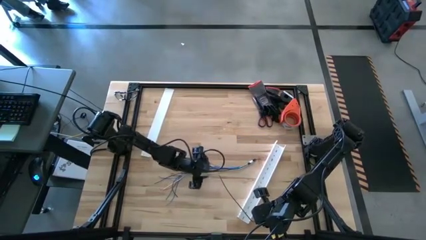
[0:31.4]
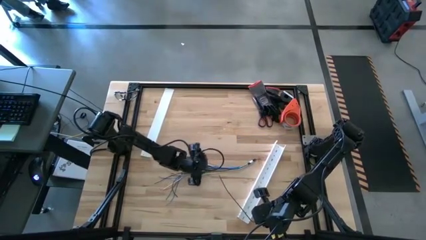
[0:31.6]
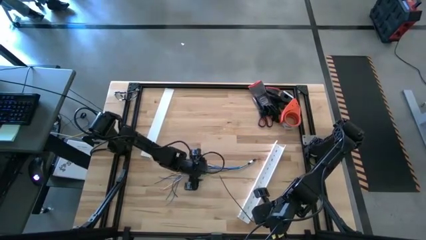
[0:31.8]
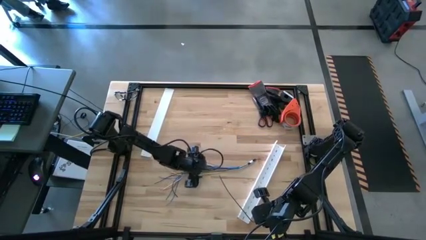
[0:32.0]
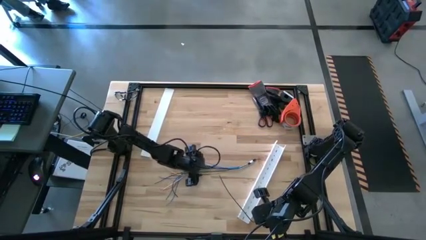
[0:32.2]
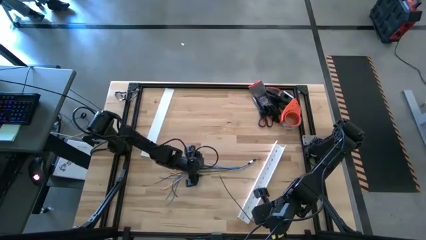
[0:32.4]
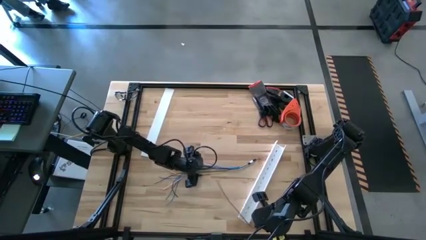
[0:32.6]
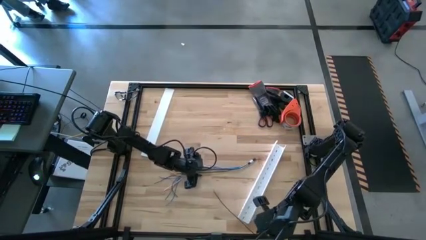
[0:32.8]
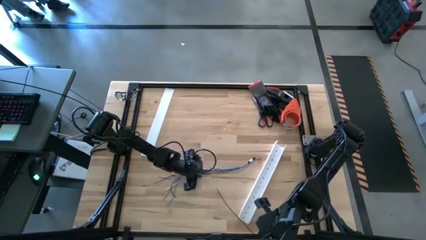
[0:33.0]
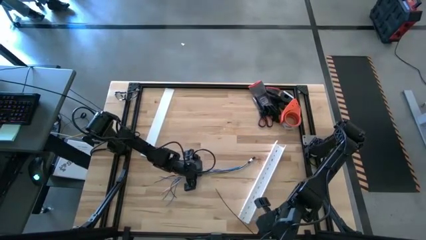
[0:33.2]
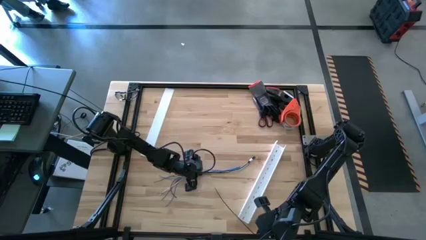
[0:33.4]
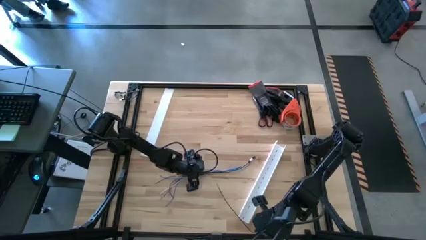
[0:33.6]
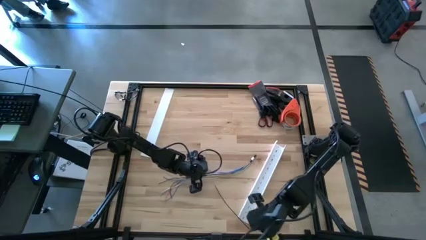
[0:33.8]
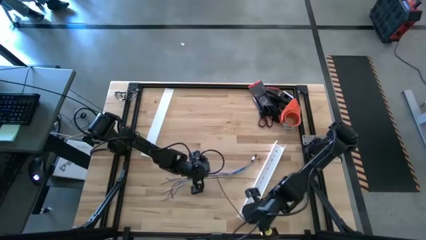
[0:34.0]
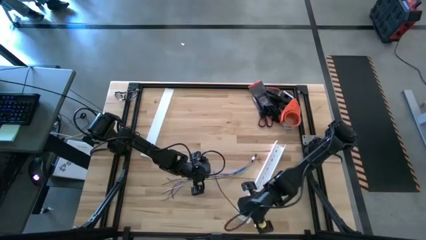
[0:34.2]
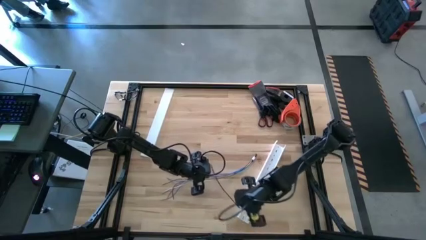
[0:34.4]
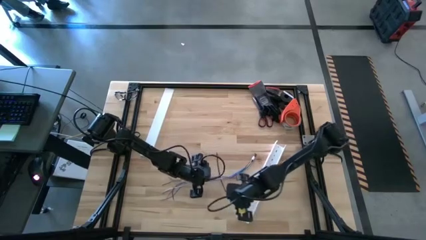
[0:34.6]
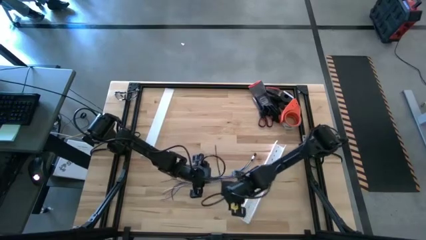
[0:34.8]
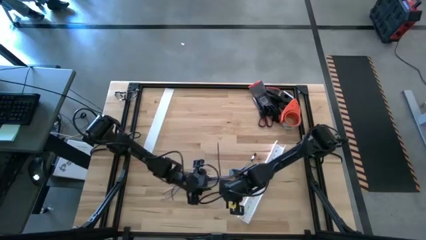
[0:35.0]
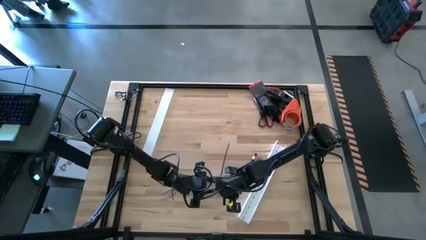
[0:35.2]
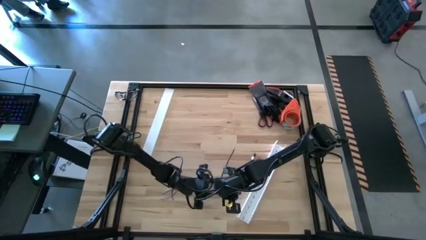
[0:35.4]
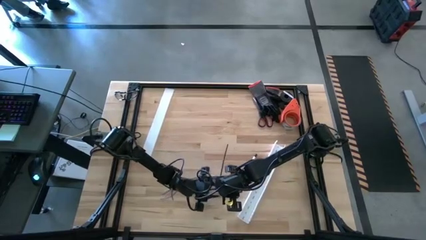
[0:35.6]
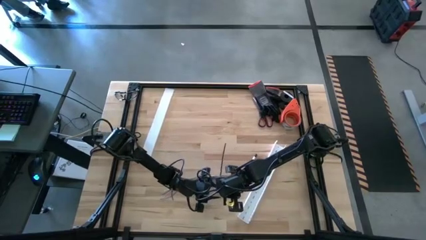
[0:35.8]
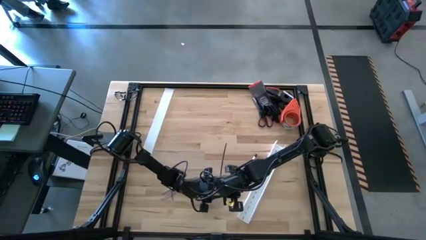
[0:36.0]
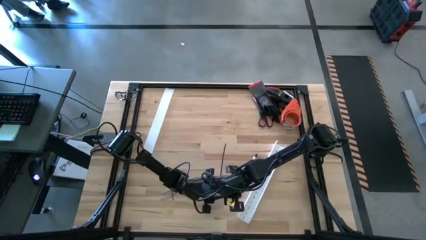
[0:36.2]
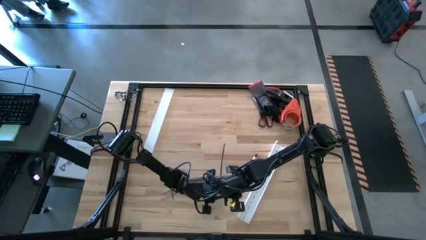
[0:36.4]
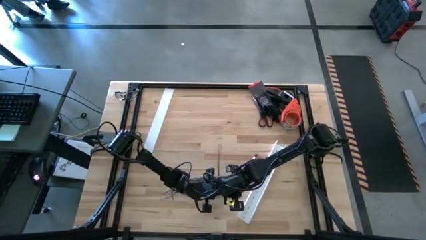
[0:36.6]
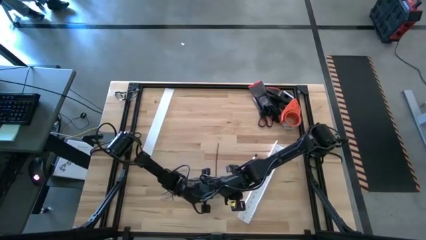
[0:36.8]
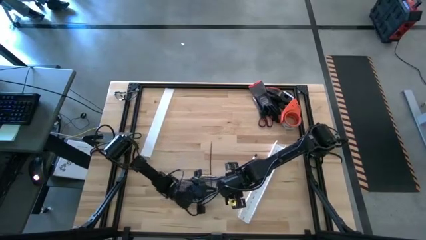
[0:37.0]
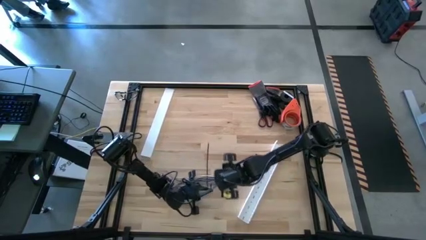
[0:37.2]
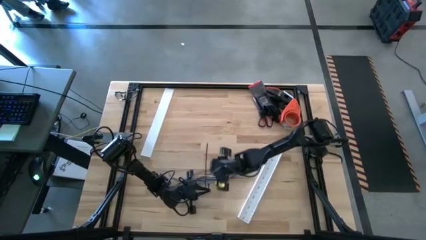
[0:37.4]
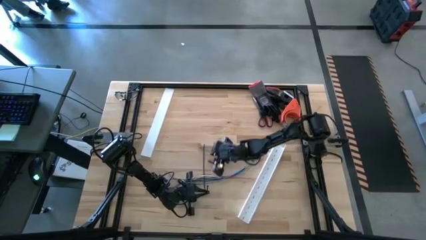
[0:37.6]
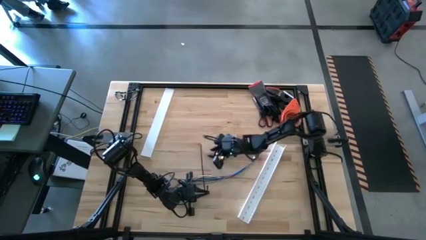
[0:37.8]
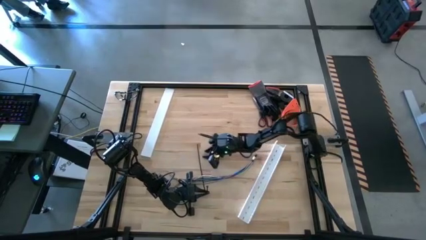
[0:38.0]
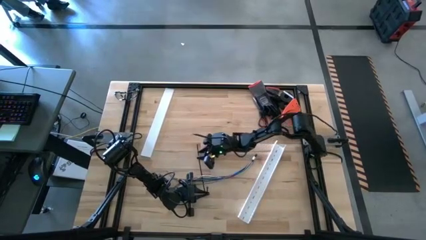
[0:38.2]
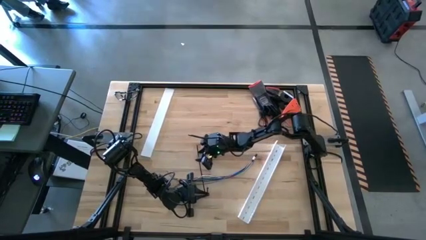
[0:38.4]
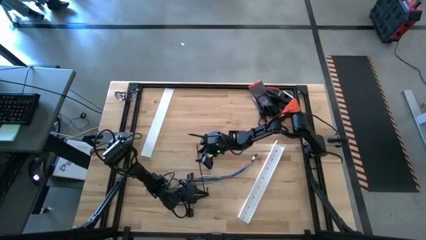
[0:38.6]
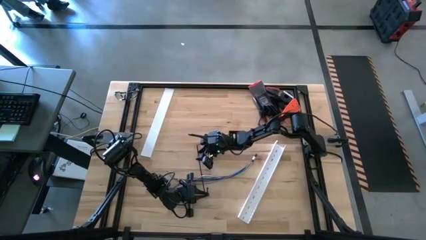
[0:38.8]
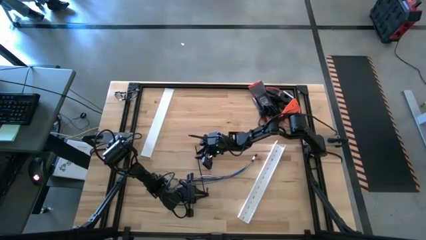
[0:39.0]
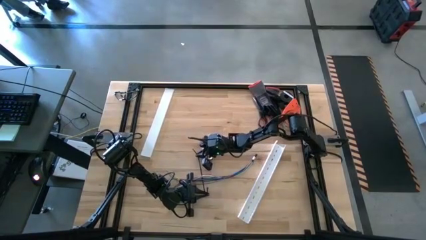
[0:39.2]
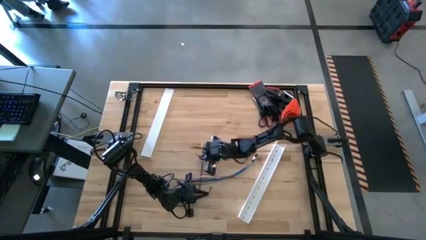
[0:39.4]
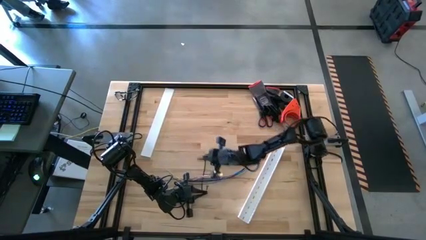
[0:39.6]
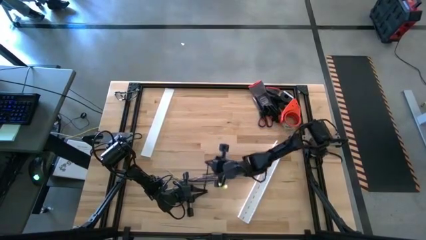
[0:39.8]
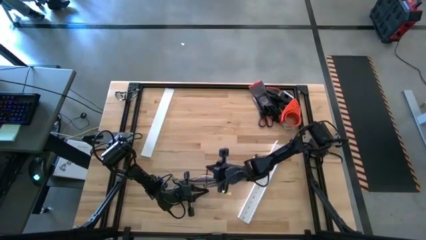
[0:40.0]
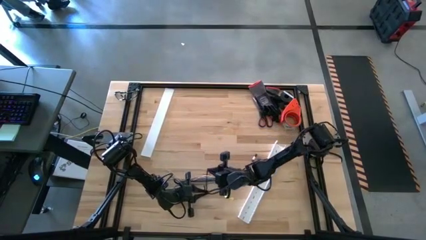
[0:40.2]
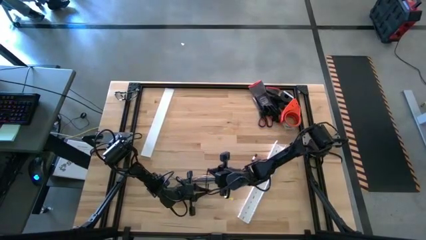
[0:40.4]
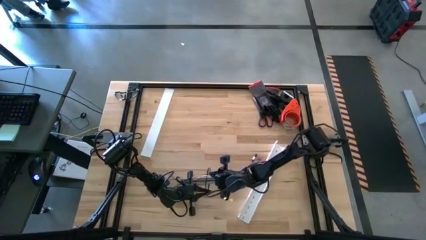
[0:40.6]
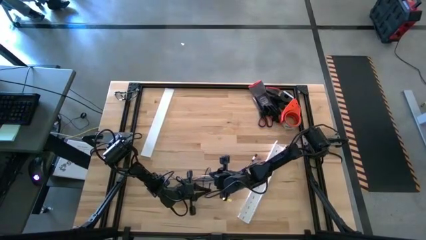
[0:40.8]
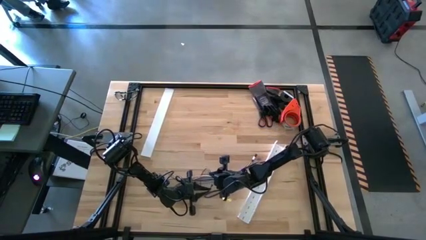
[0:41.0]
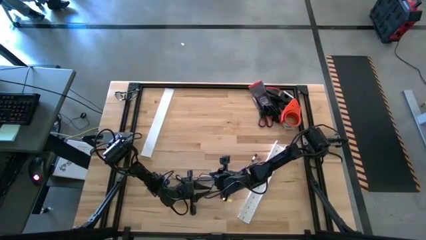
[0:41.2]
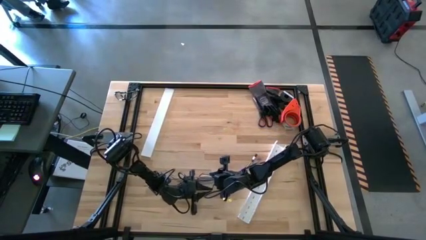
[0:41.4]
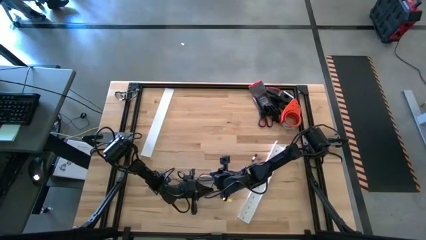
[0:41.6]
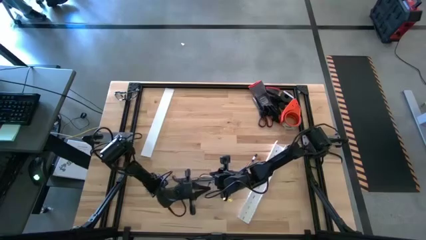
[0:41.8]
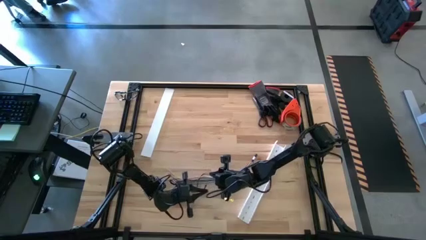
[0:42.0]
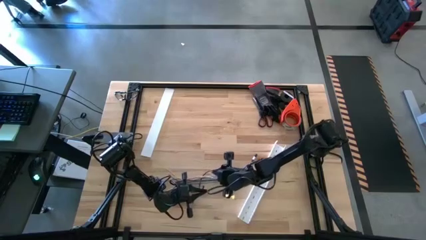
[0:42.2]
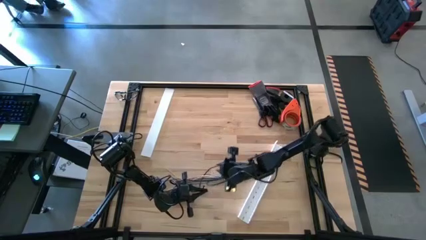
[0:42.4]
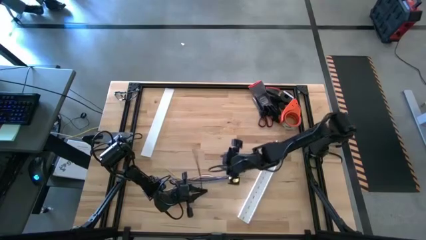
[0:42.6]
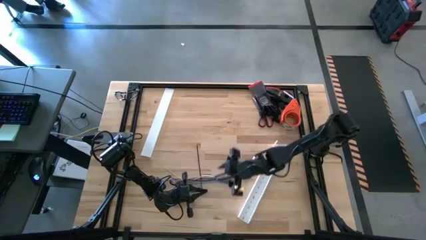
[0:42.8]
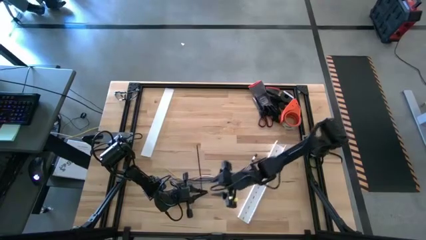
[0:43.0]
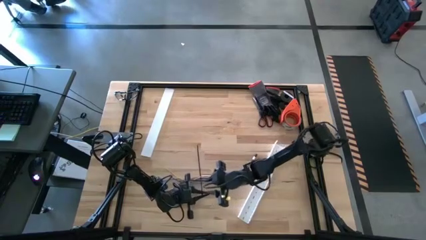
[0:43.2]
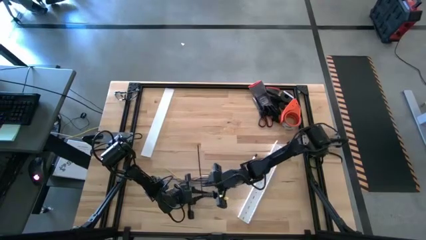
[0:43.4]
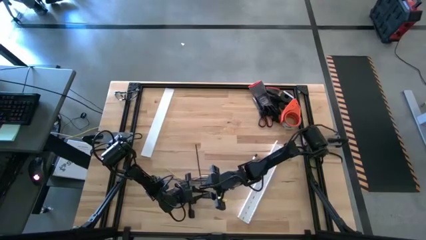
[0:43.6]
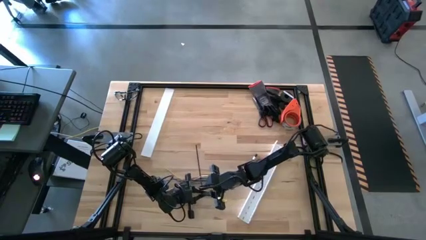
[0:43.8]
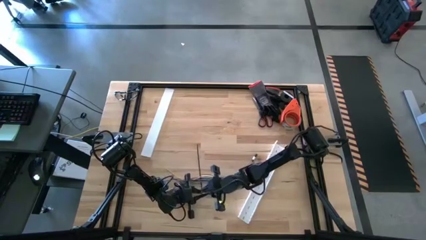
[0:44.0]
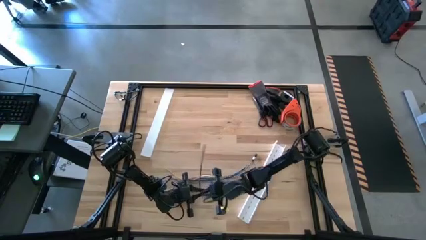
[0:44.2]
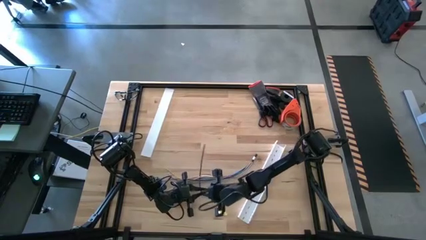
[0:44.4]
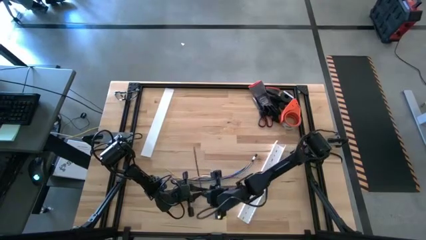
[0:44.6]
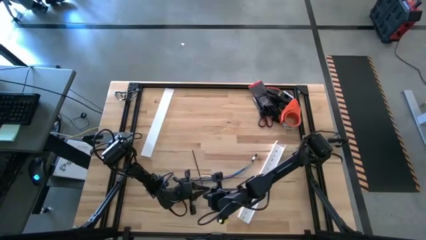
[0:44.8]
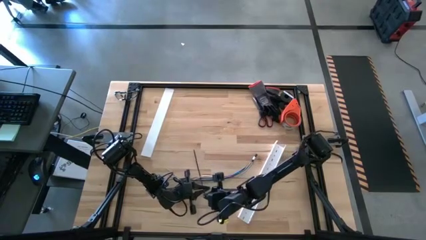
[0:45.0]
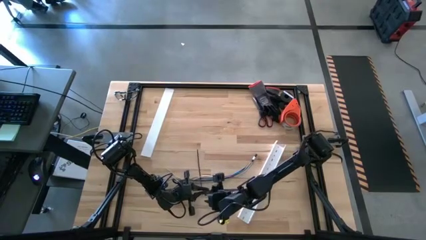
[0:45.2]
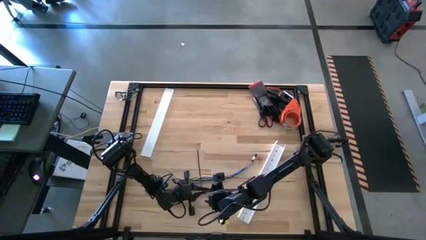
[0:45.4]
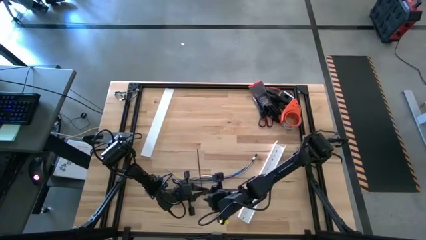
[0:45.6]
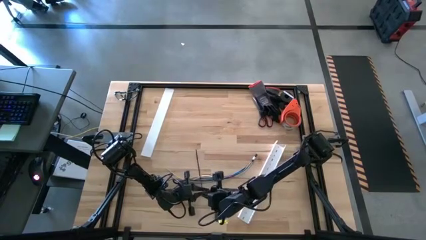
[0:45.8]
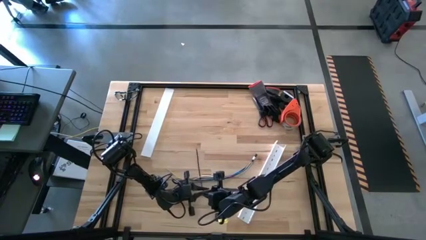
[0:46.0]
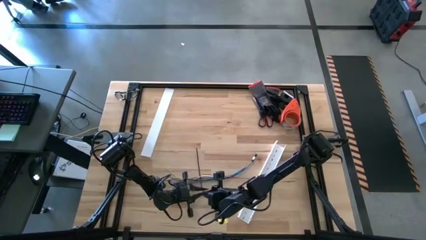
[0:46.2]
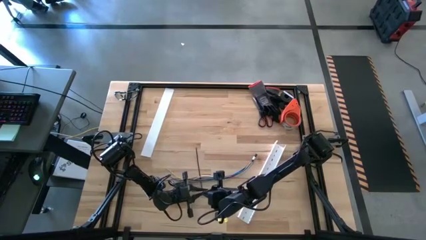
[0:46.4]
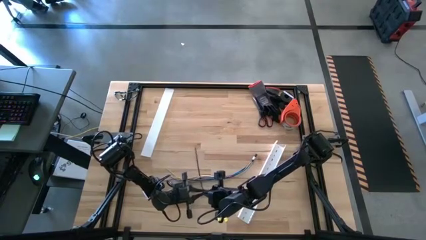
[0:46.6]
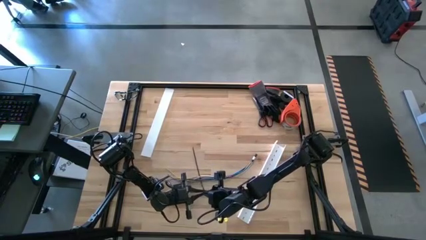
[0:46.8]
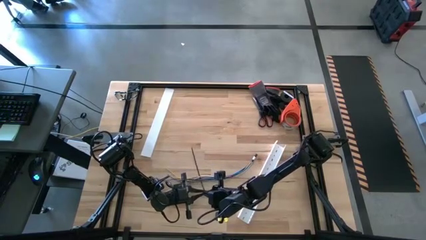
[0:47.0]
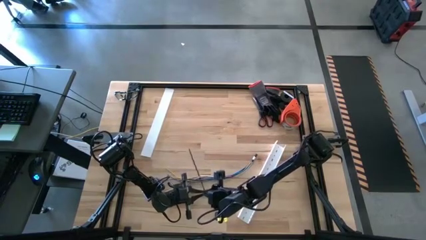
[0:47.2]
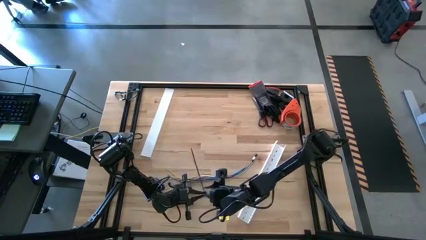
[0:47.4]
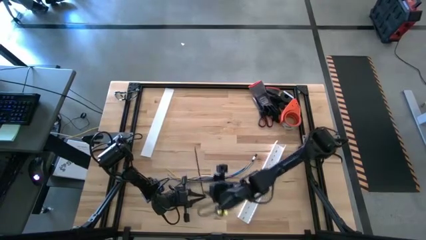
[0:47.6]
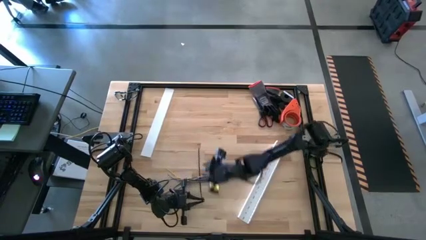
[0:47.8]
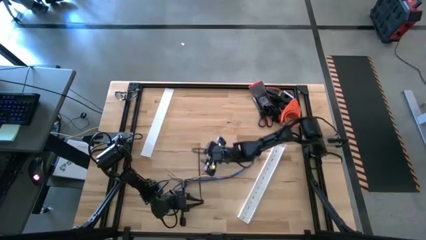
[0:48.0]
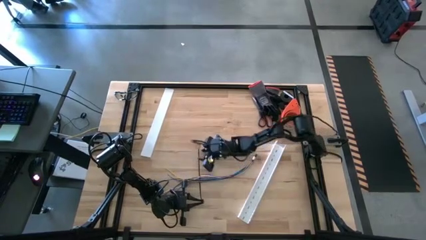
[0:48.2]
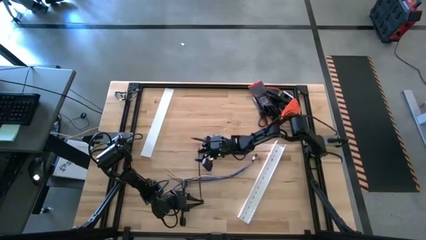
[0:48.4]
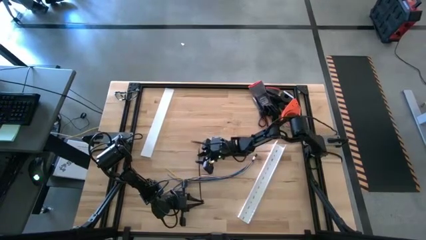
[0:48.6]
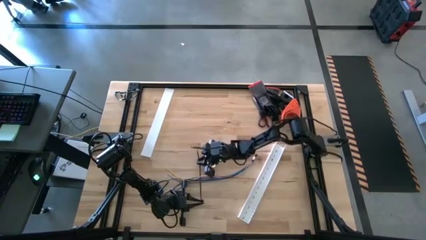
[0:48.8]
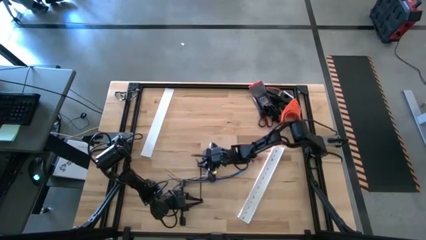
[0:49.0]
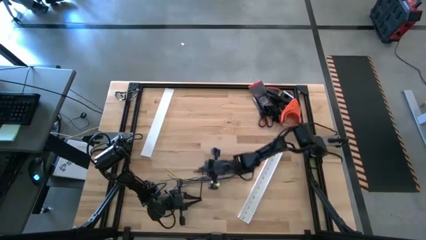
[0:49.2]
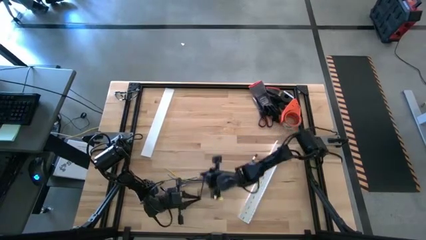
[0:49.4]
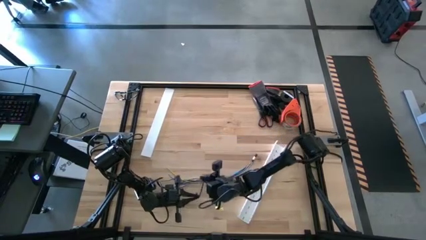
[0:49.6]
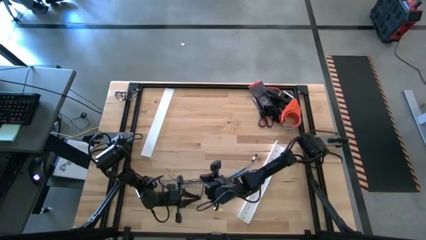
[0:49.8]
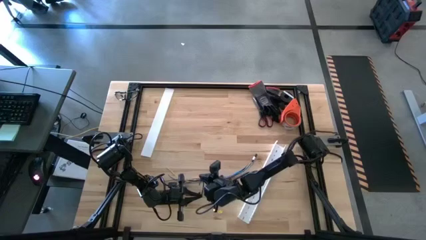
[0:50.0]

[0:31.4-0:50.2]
Task: Ziptie cables
Wrap the colored cables with the black zip tie
